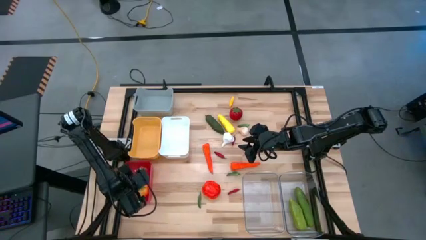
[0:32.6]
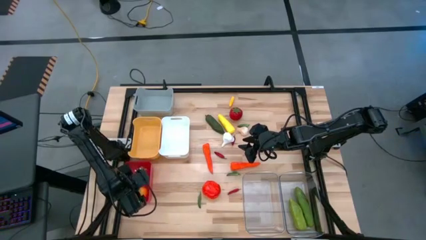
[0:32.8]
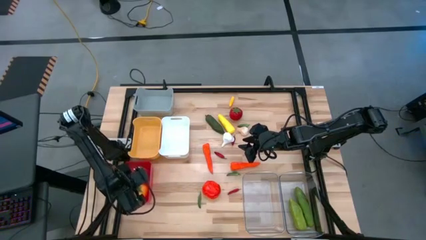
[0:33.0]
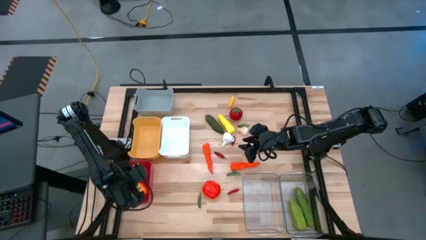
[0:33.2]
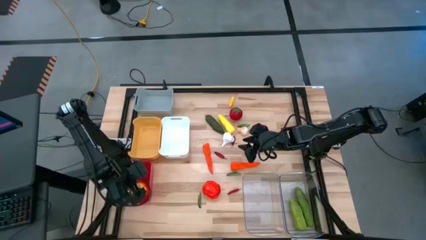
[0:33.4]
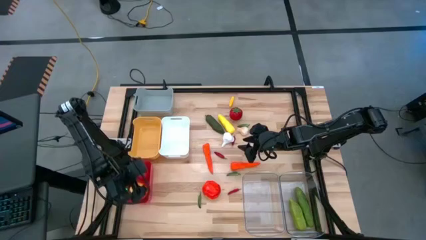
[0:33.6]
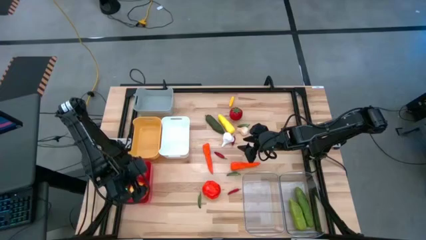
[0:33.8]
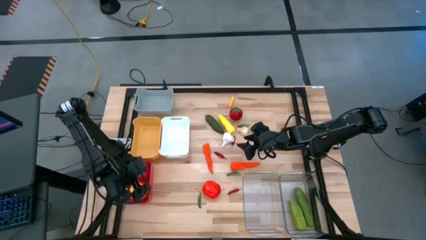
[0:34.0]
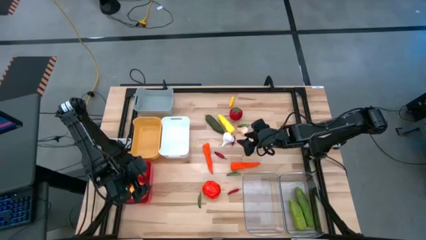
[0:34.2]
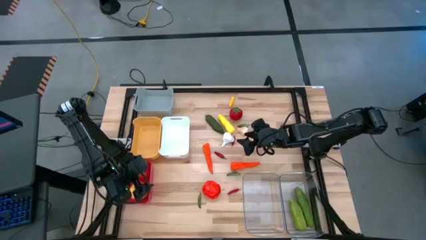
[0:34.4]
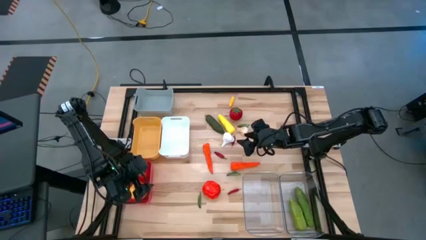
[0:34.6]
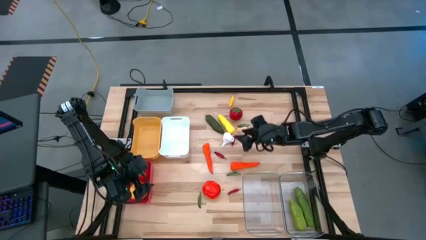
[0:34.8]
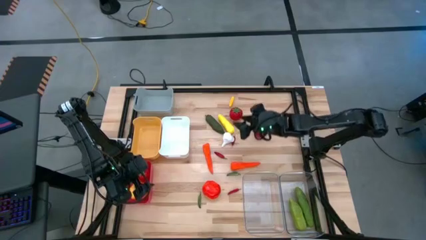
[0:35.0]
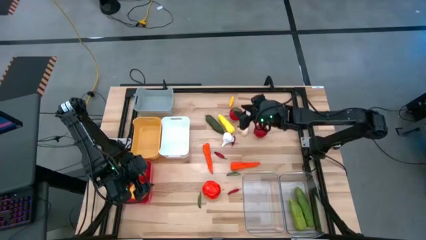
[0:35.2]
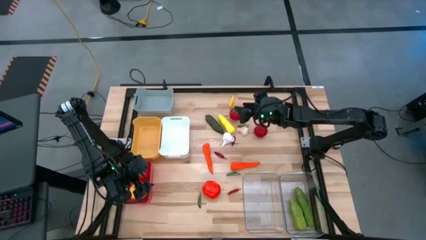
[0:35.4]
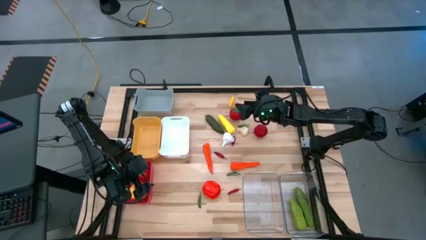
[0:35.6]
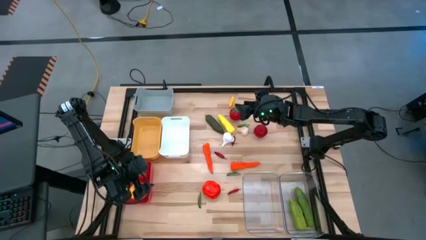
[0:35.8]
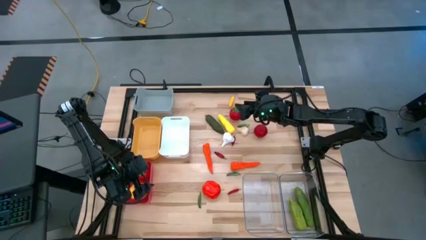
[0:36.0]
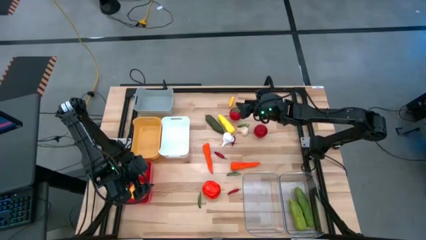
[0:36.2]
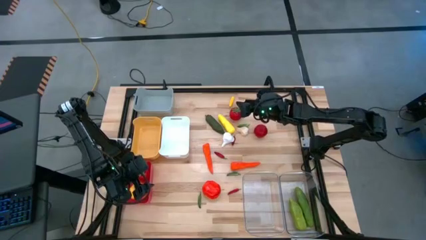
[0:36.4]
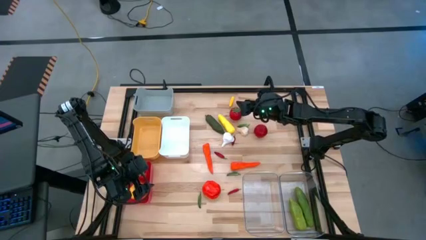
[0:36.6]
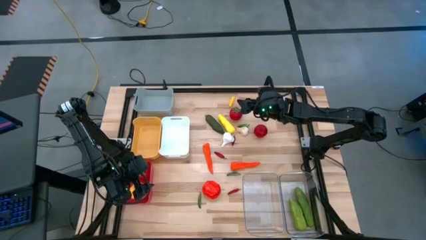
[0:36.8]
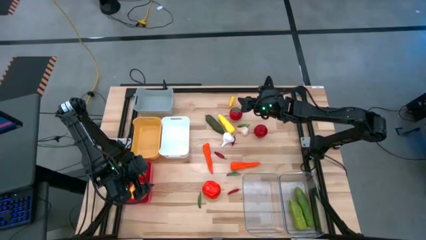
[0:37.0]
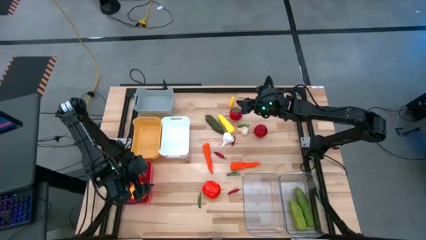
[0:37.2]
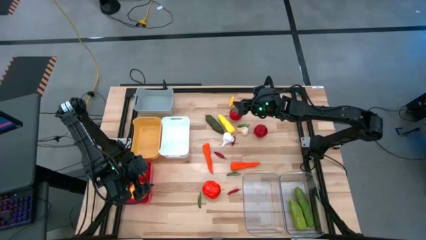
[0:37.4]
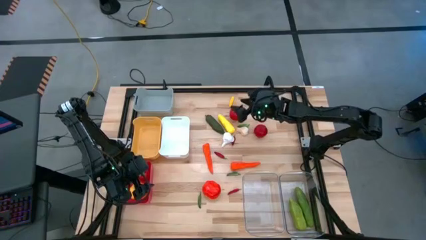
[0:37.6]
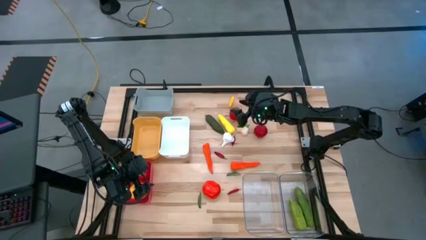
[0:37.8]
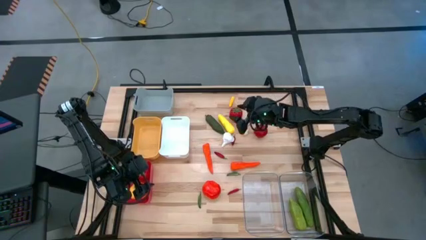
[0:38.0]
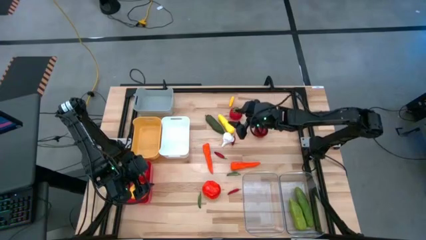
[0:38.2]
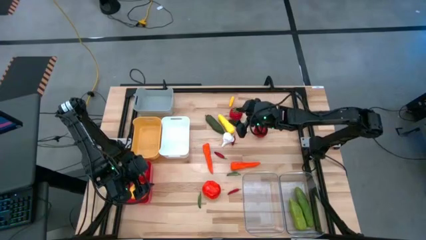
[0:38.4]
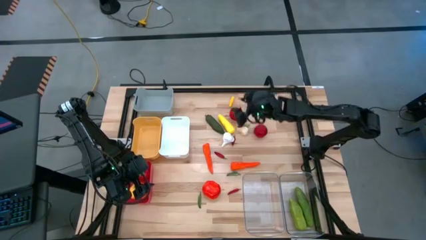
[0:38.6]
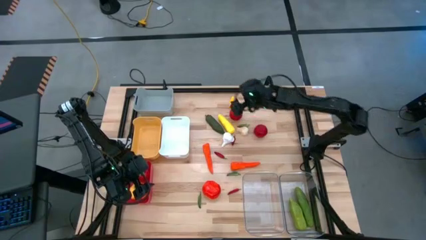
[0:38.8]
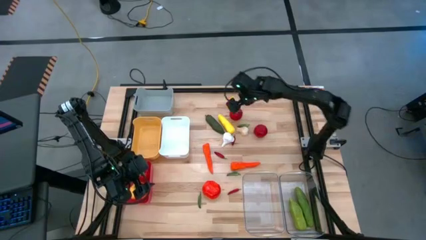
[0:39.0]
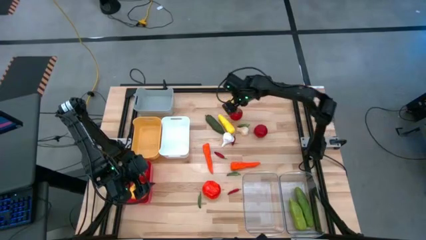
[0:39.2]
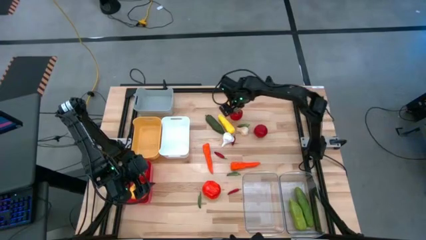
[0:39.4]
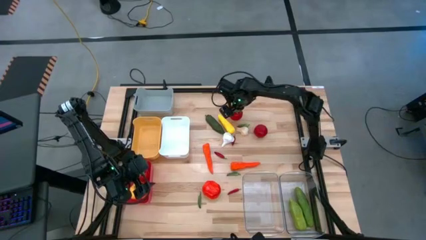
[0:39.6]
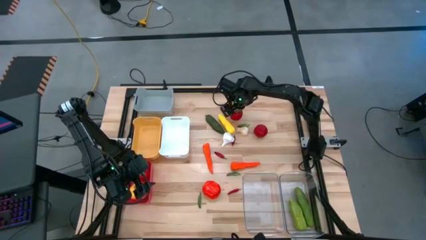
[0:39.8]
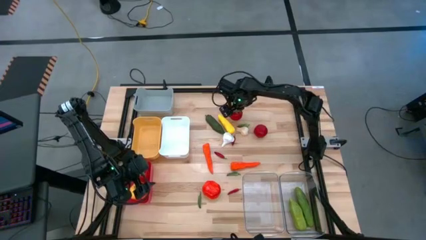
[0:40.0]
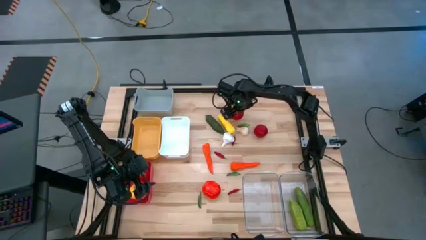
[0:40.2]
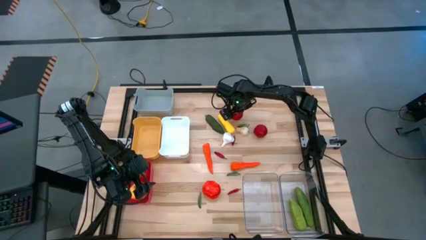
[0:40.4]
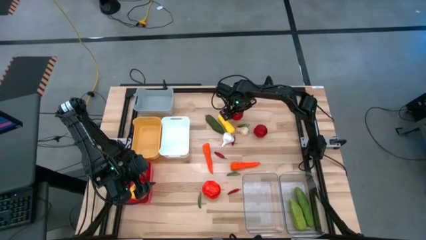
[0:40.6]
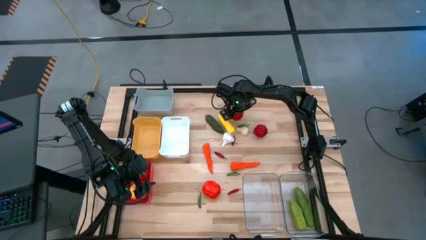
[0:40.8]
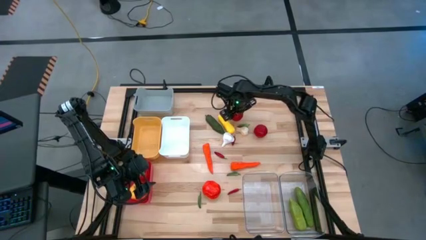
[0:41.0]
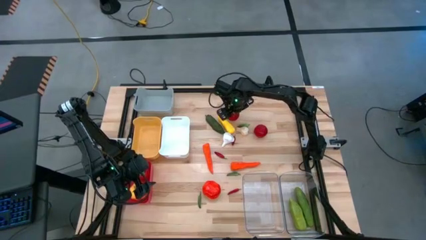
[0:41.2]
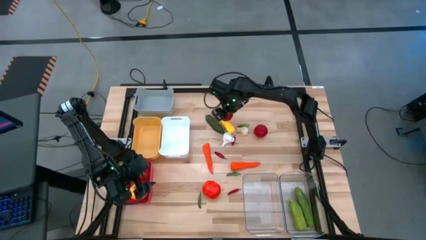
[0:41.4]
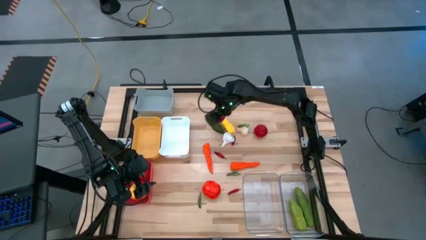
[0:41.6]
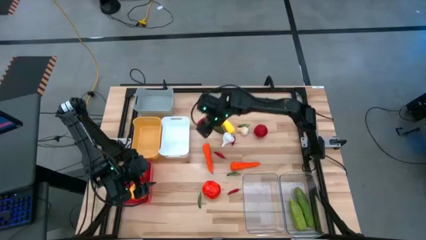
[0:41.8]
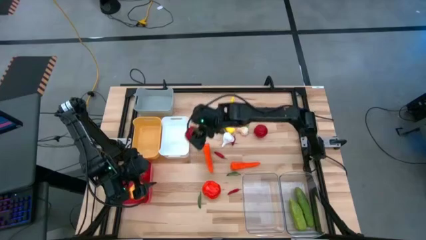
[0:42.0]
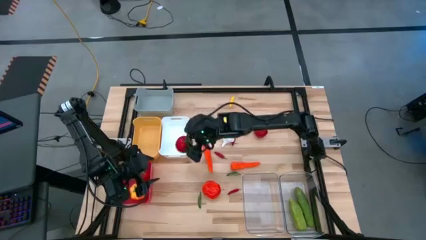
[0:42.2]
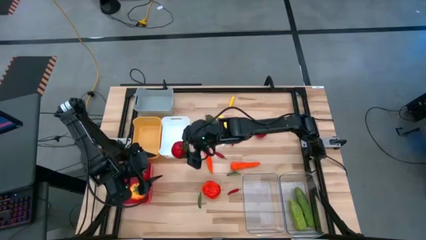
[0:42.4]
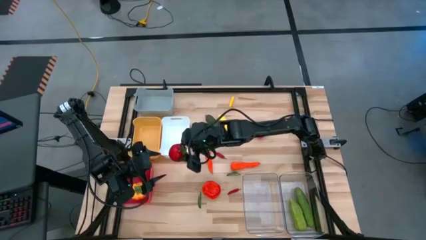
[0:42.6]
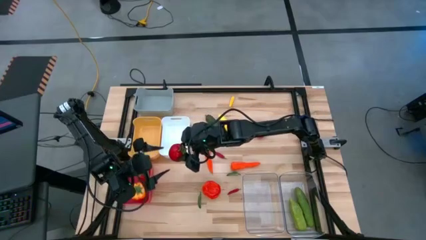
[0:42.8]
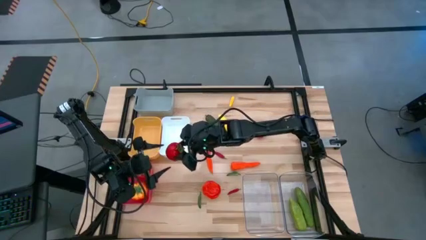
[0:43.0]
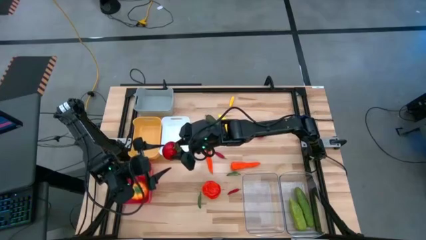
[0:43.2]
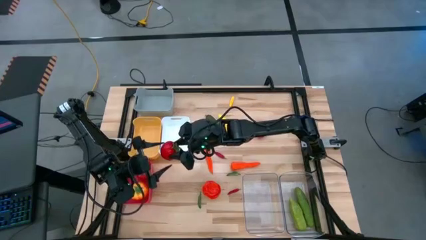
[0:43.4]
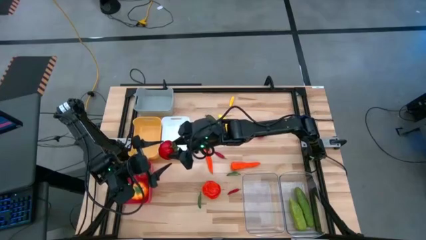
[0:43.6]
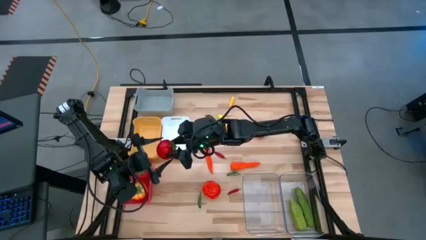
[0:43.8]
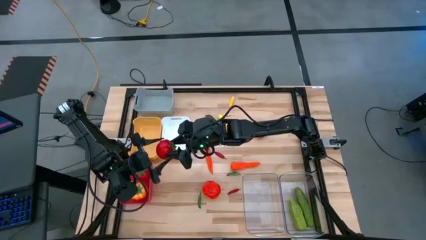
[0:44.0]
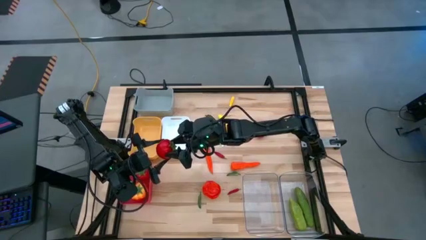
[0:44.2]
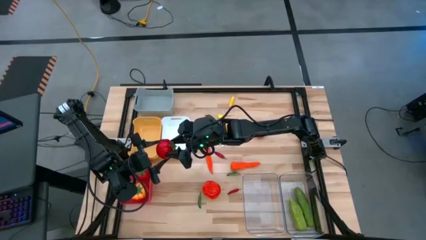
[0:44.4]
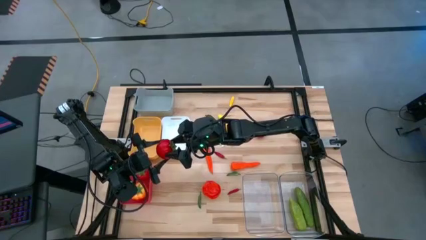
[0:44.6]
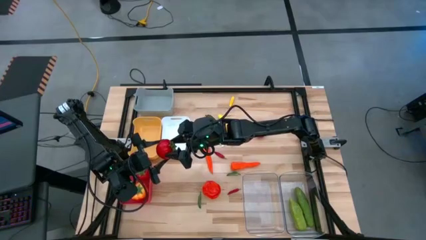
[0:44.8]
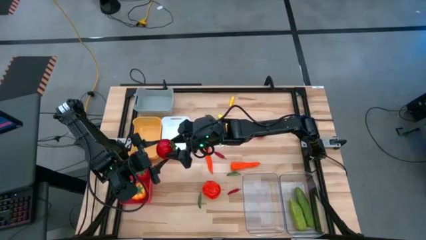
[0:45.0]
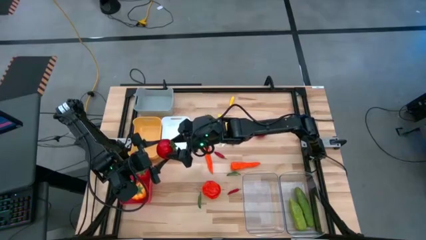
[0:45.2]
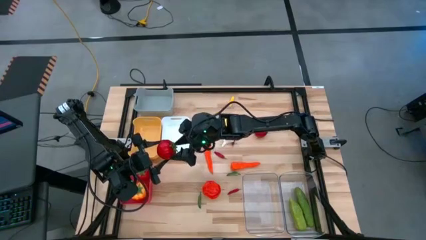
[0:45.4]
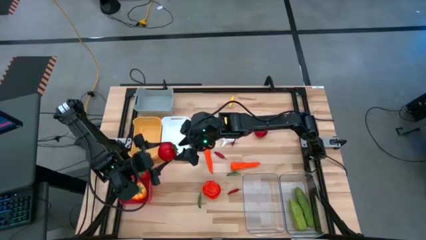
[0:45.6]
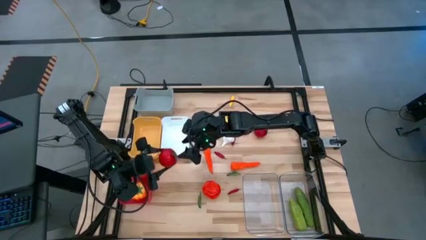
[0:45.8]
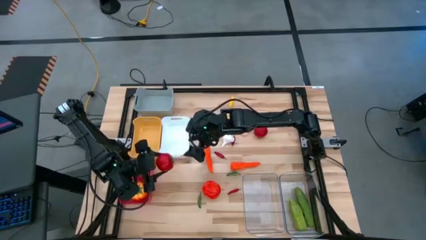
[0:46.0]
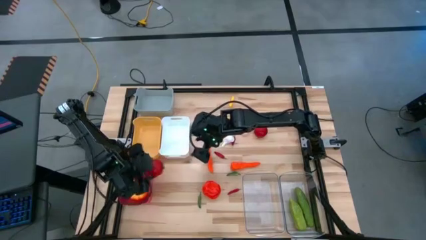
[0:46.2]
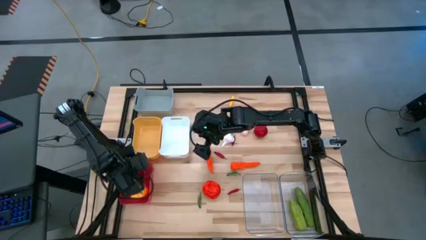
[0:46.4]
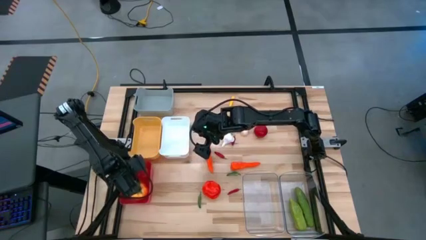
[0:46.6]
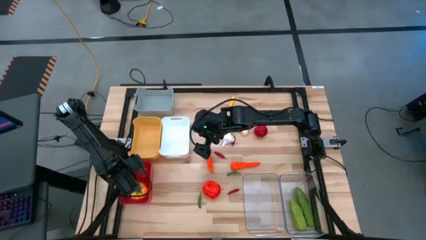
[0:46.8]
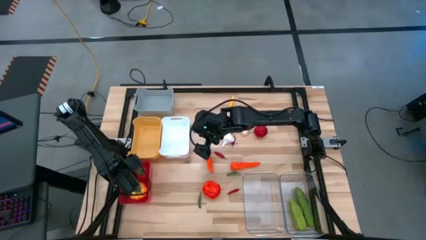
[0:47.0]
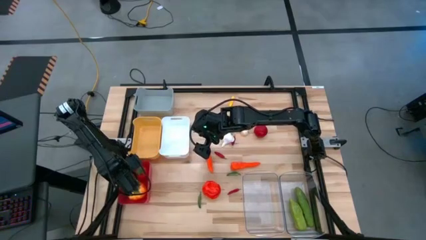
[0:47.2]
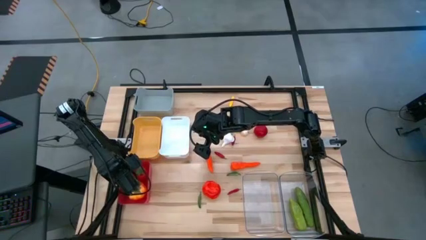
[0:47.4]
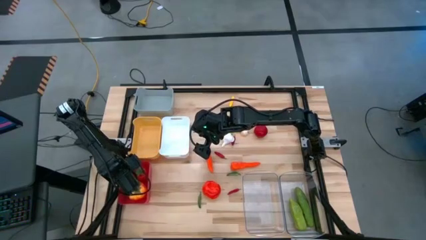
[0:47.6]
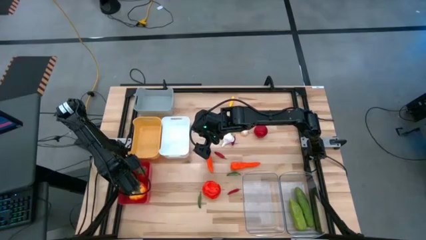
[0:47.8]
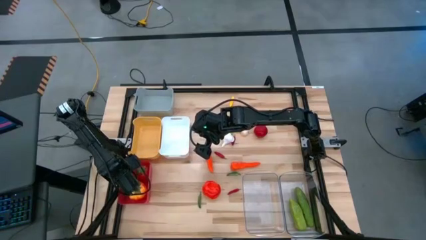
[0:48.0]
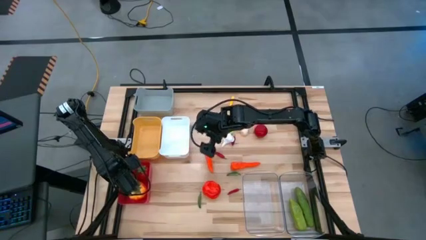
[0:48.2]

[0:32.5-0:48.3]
Task: Sort produce into baskets
Put the top red tomato into the red bin
